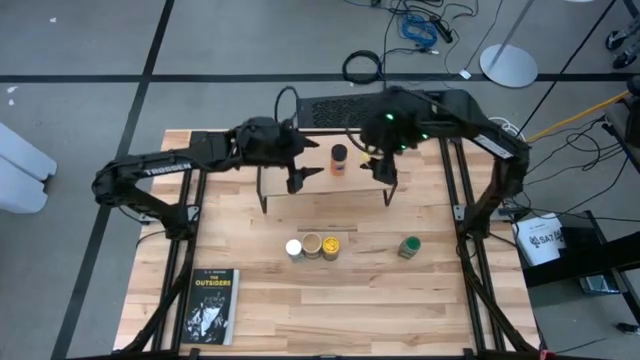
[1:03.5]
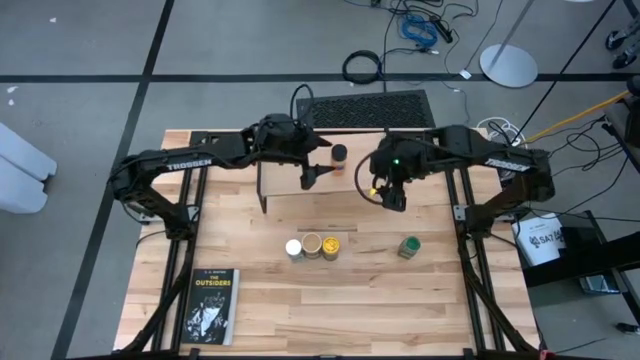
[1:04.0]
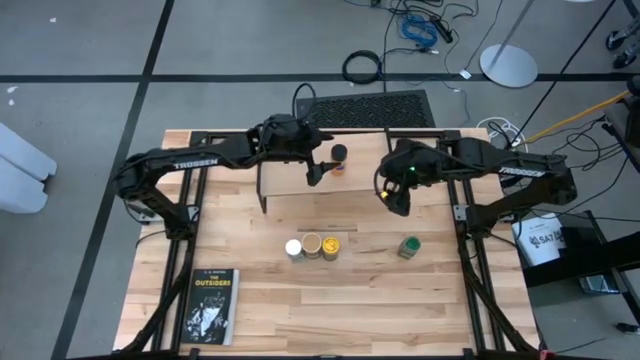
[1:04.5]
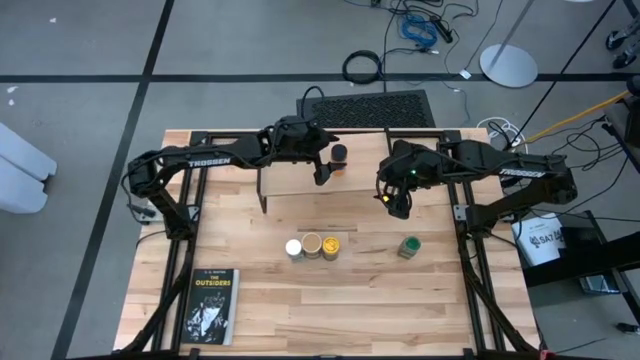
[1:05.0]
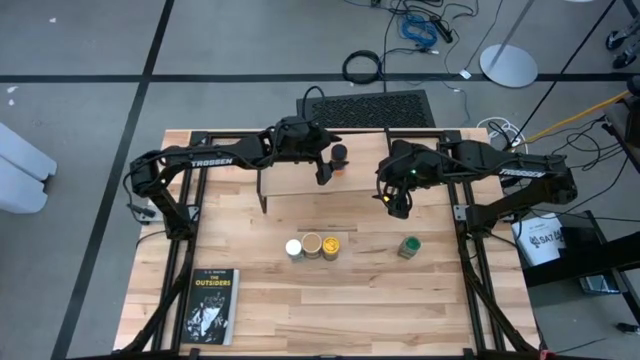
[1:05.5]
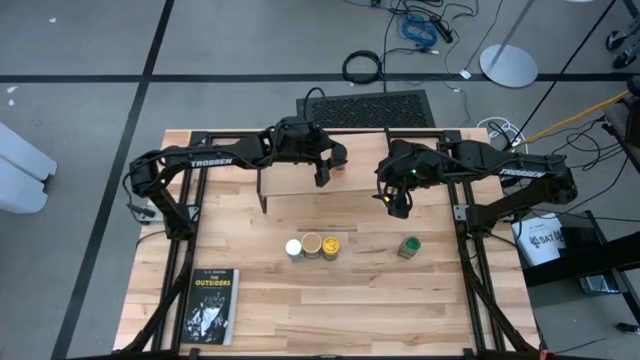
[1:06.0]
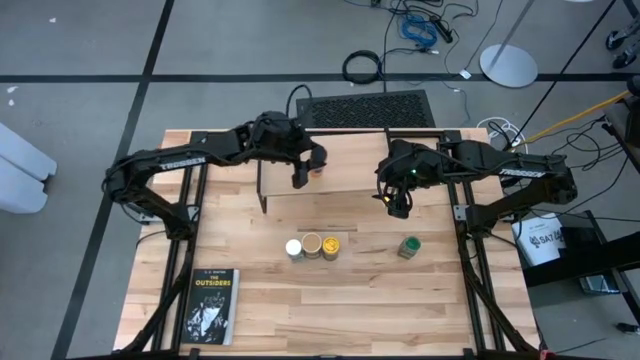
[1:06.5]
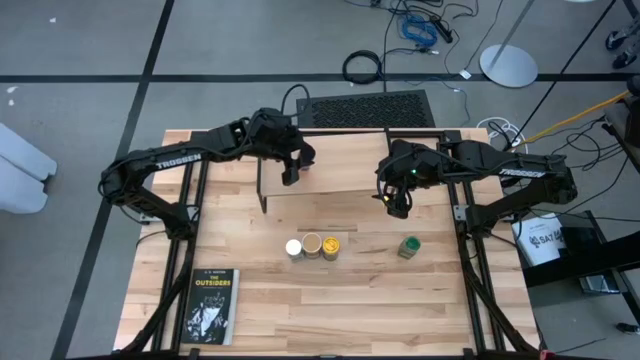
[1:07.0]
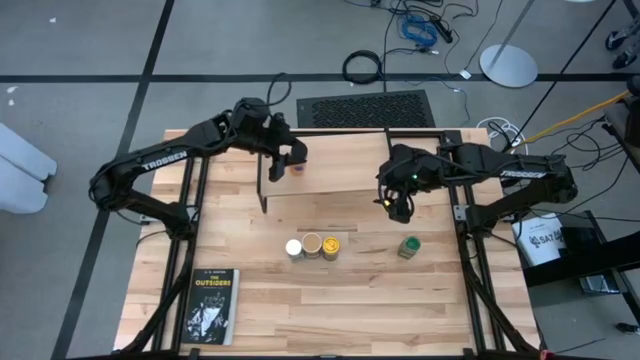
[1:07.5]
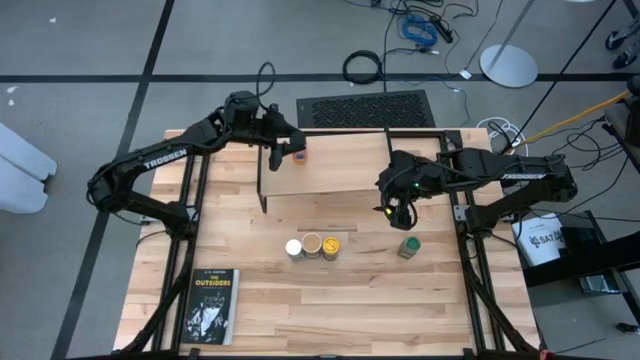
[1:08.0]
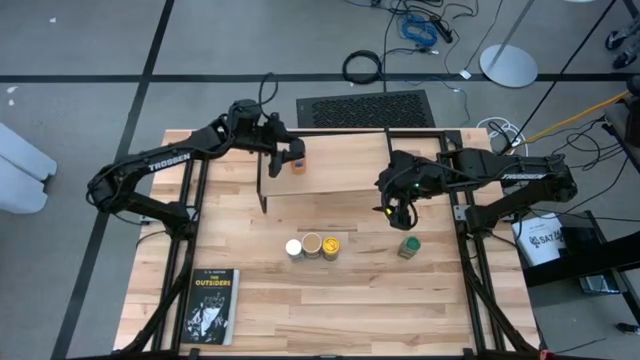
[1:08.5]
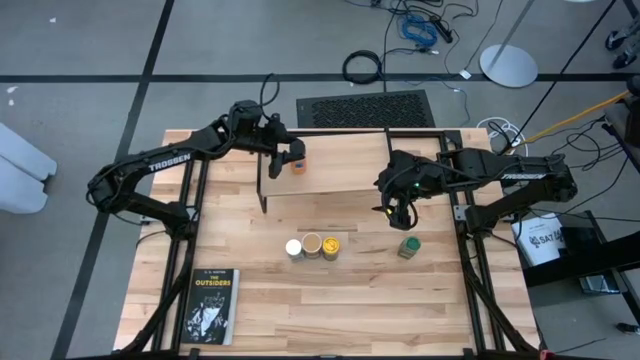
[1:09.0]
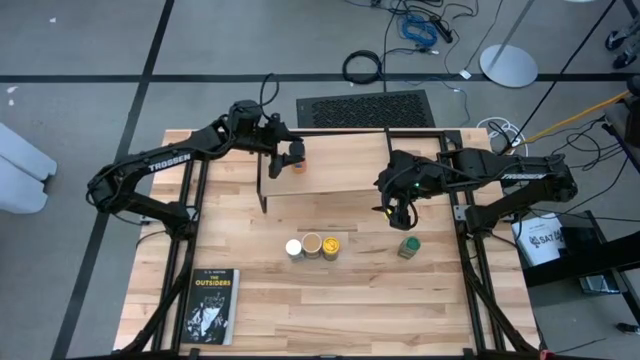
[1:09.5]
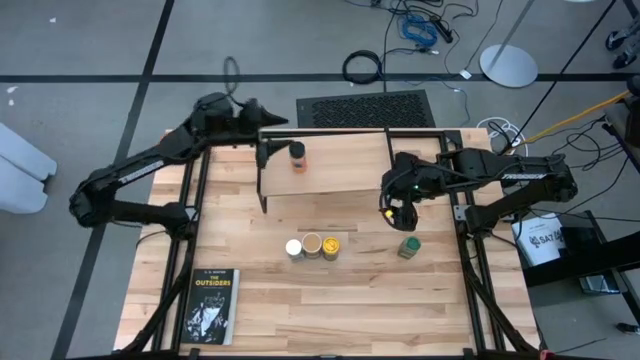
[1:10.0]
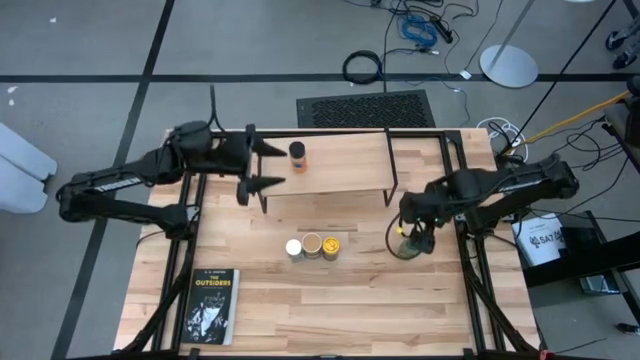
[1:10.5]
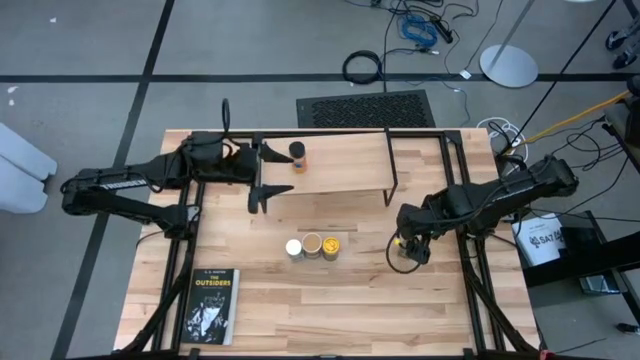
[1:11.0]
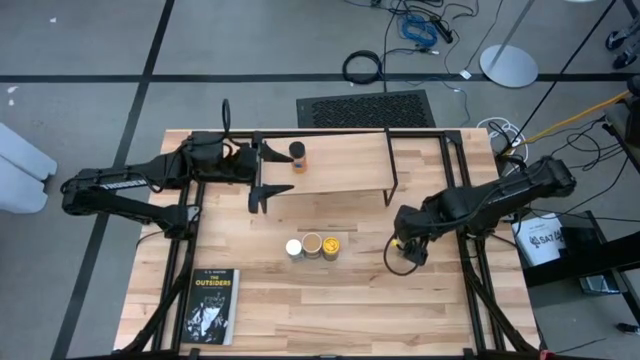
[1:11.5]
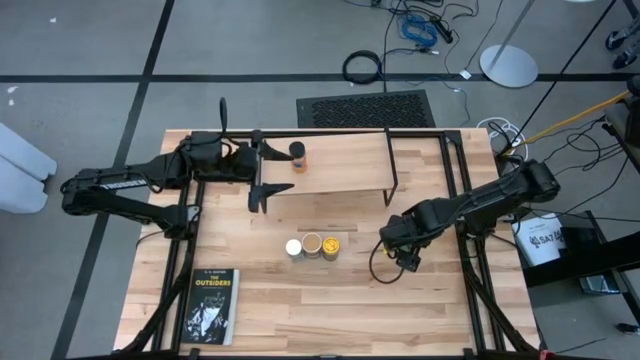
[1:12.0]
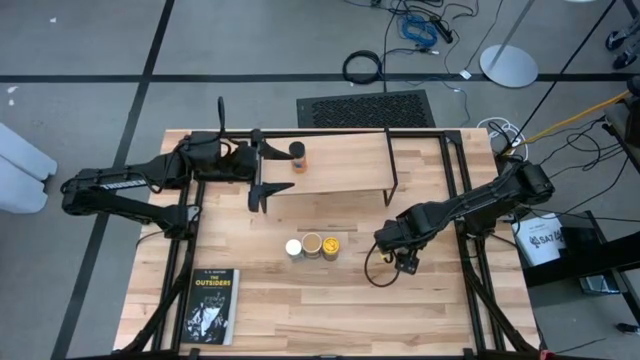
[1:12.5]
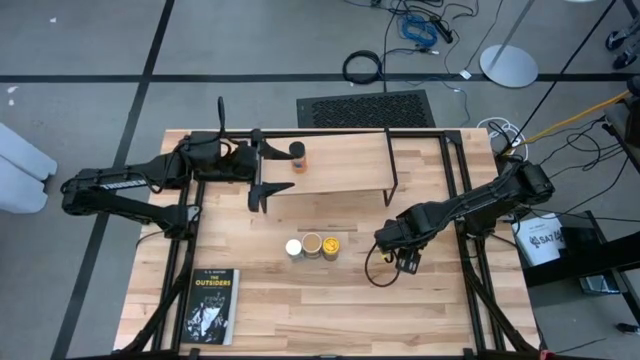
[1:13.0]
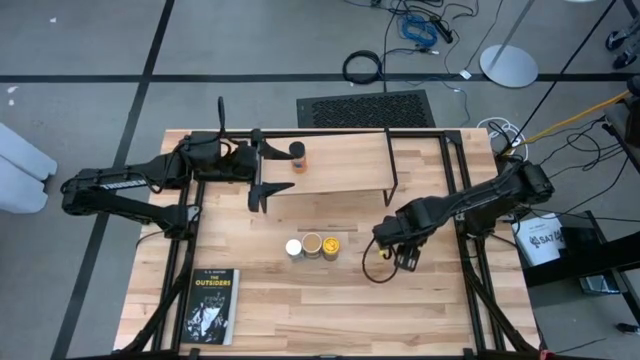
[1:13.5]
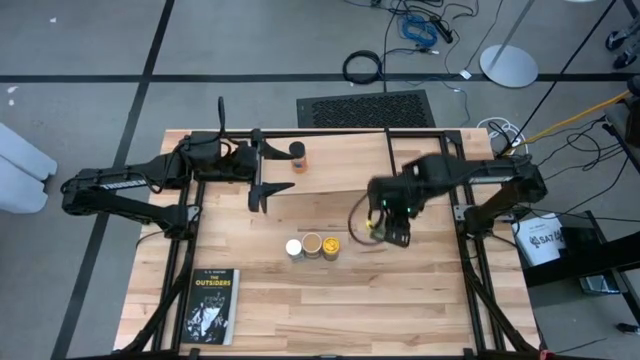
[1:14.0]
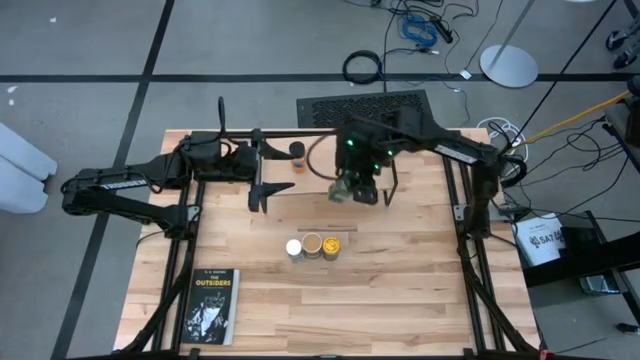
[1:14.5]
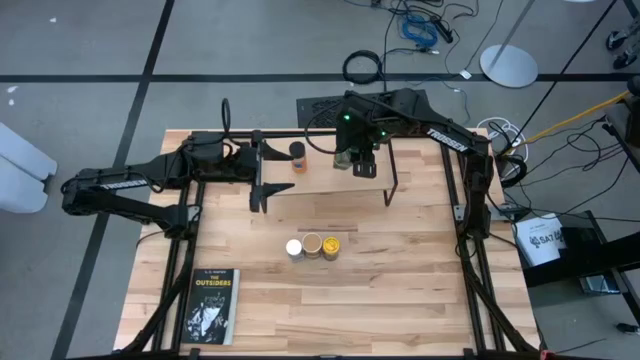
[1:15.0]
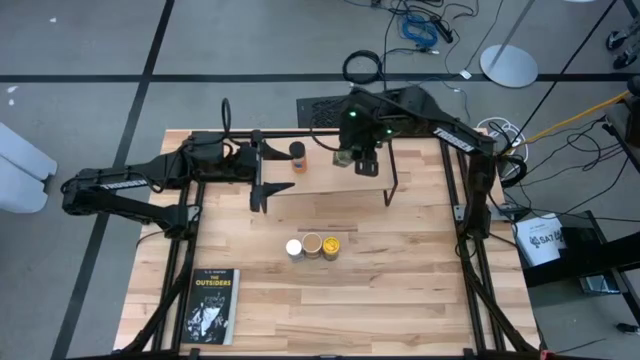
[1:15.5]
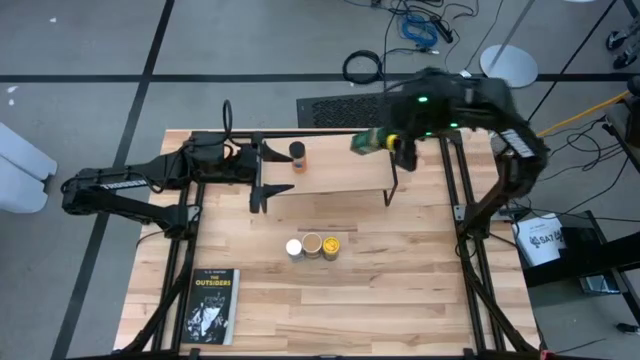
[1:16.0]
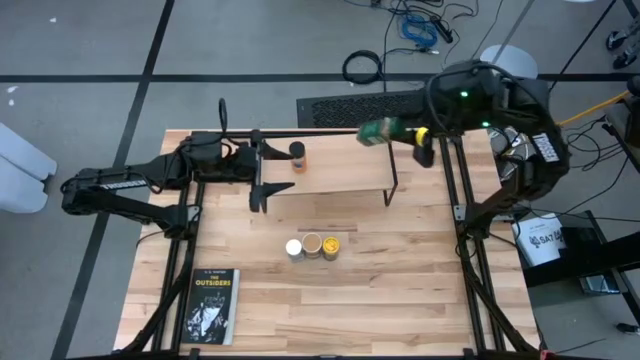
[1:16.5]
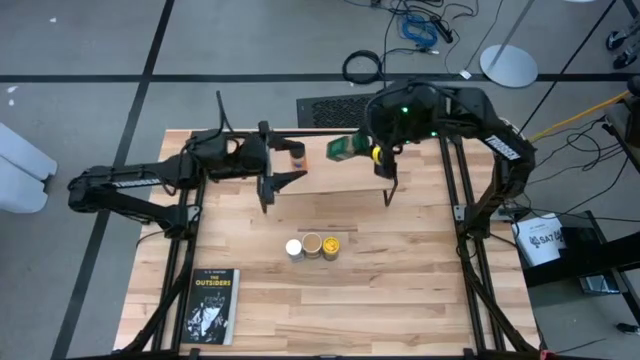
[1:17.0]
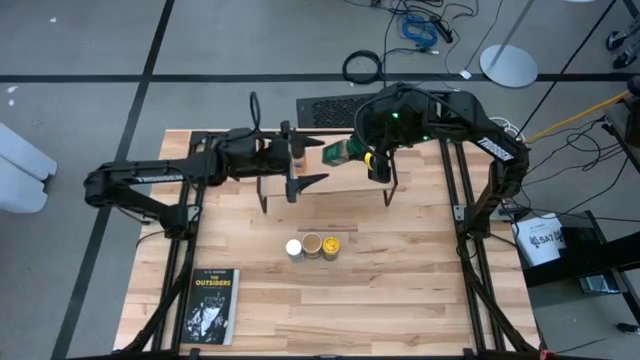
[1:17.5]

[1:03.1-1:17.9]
Task: Shelf spices
Put the green seasoning bottle on the shelf

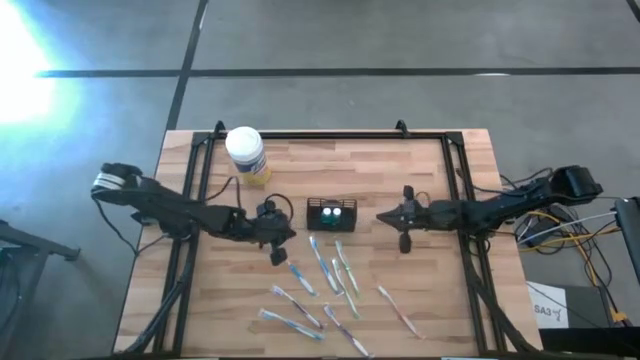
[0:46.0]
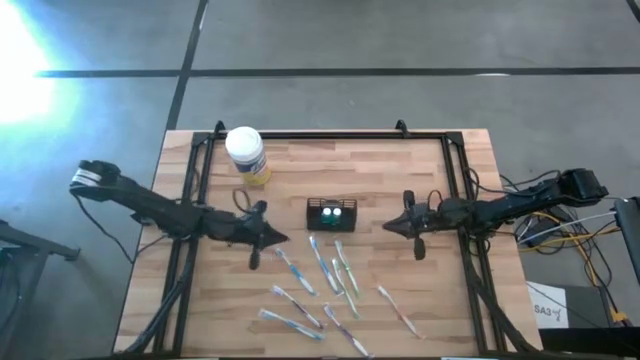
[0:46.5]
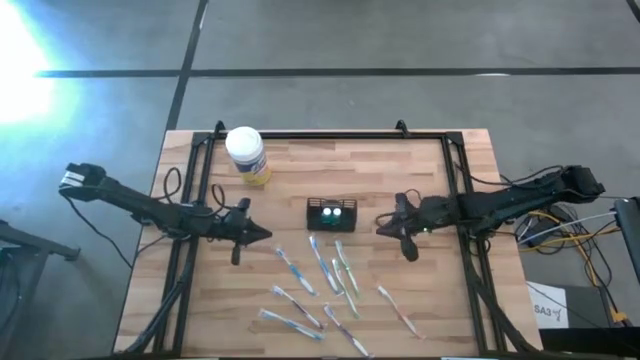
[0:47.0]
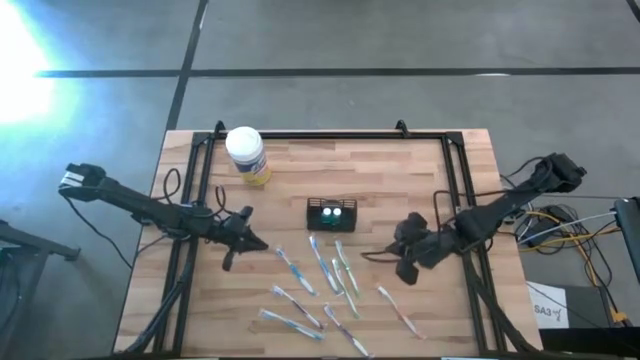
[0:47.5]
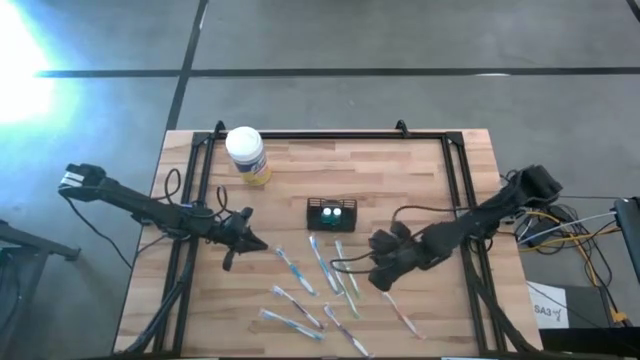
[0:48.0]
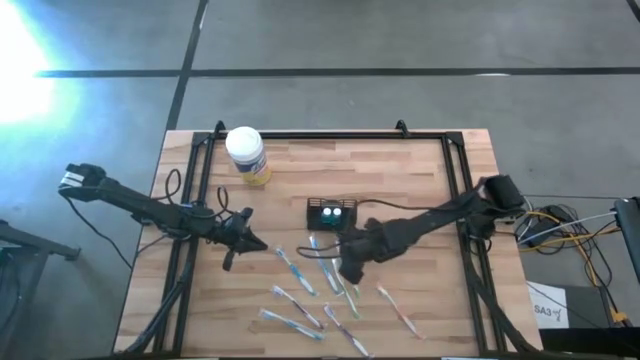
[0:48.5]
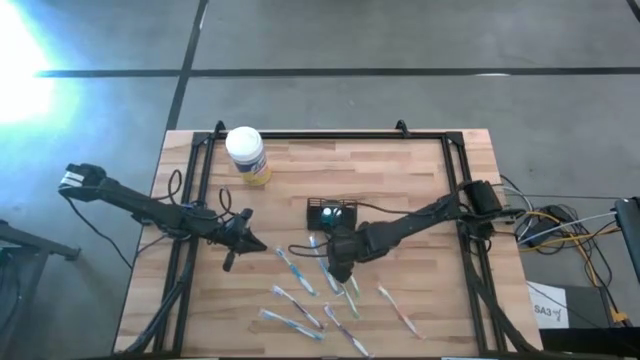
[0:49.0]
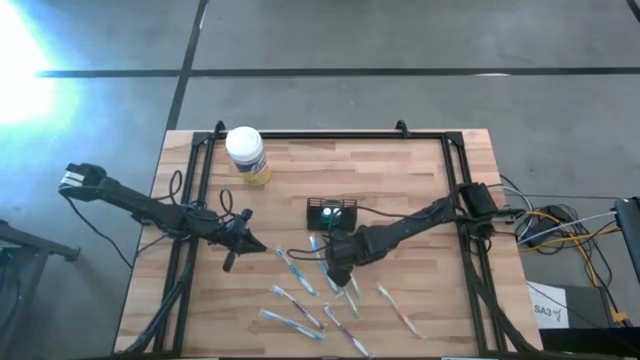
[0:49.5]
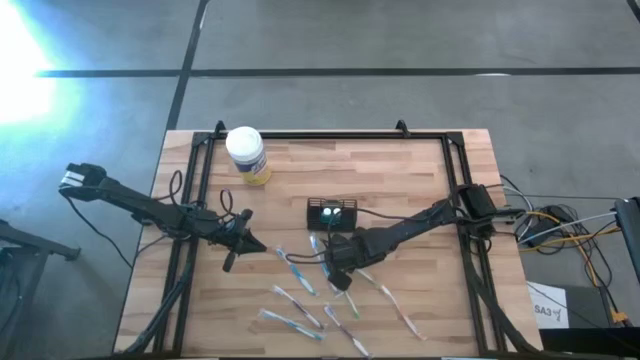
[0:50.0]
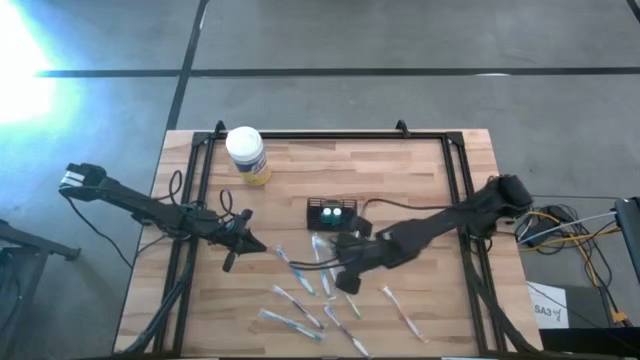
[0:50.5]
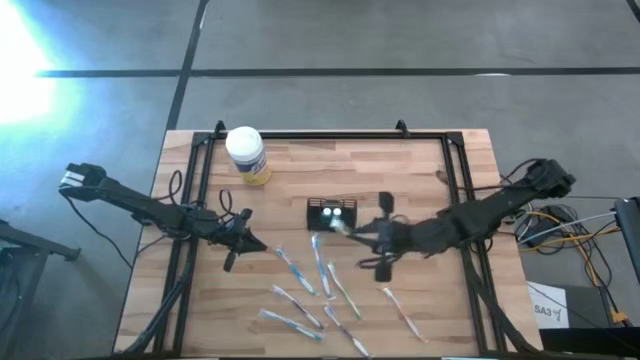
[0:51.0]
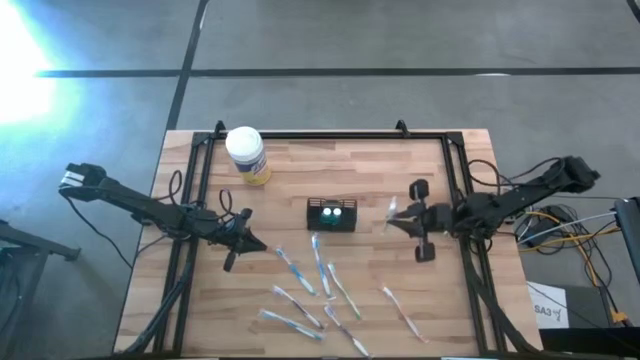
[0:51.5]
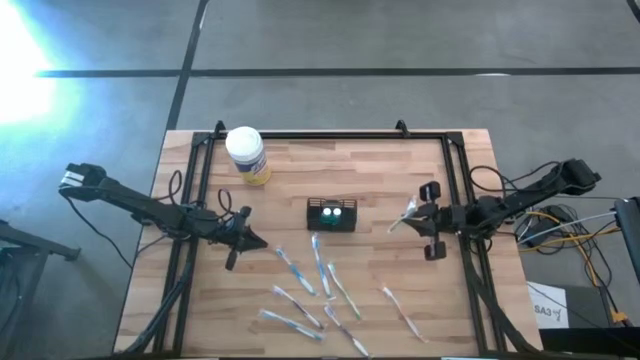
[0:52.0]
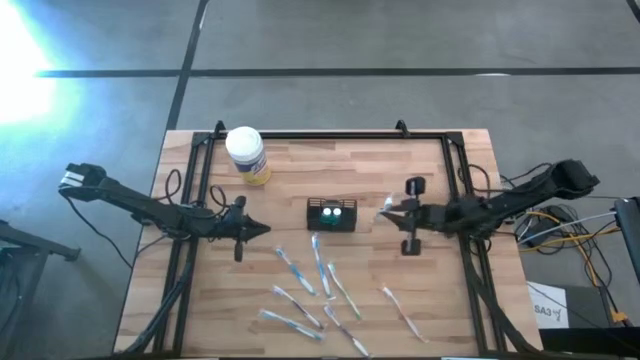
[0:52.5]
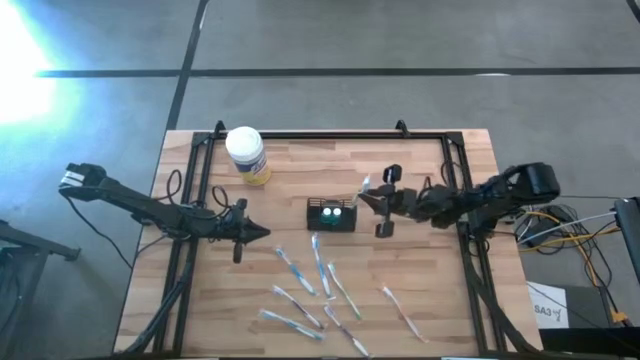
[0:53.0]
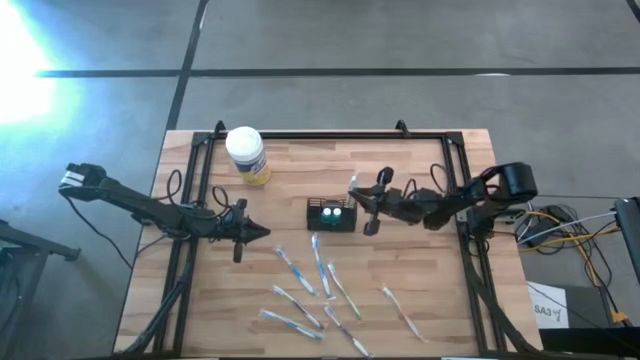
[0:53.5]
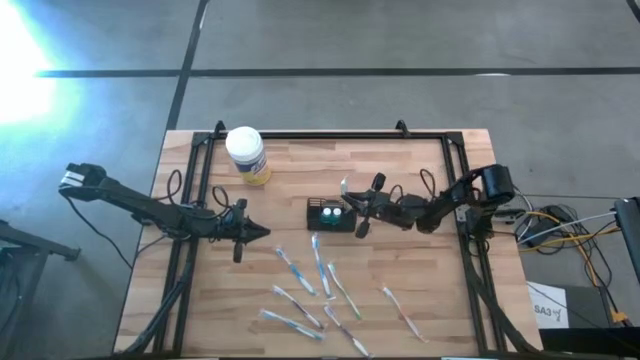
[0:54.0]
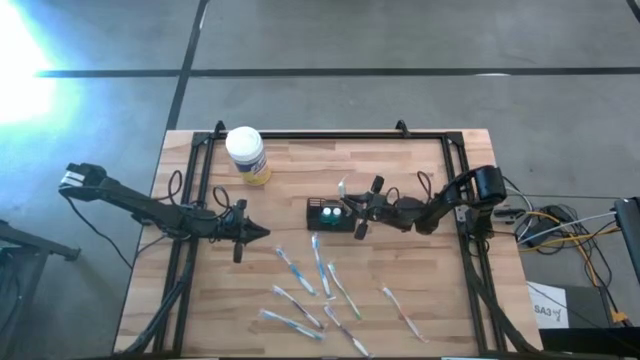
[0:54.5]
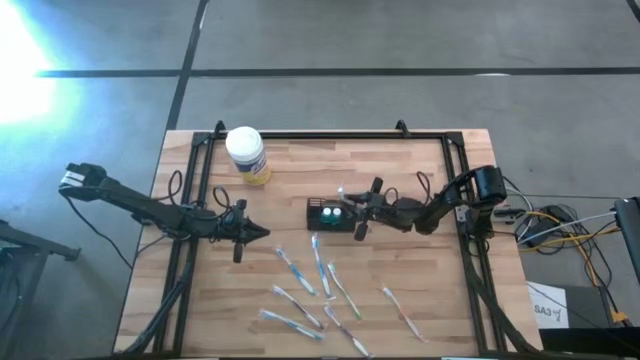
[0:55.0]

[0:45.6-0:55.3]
Task: Pick & Place toothbrushing station
Put the right green toothbrush into the black mesh organizer
